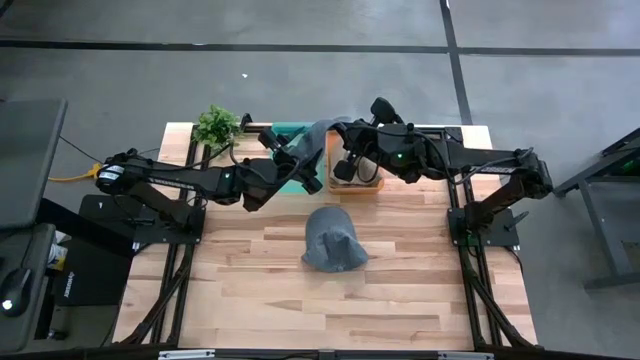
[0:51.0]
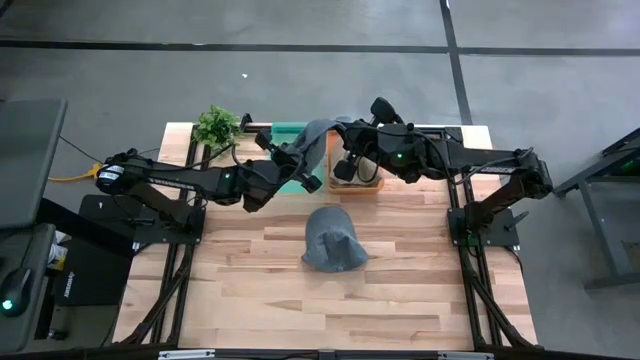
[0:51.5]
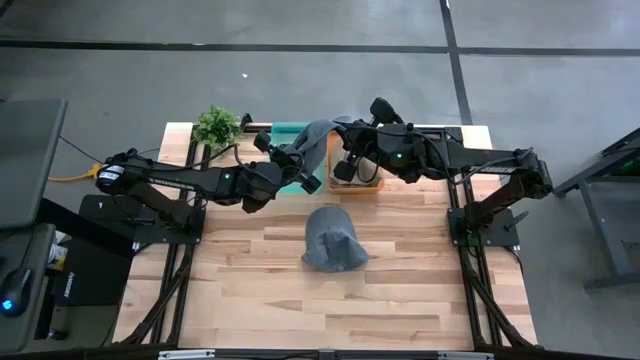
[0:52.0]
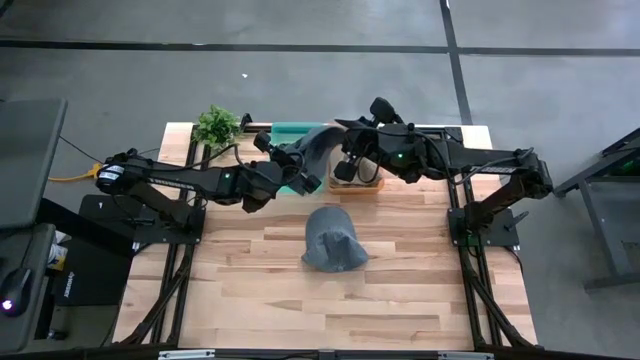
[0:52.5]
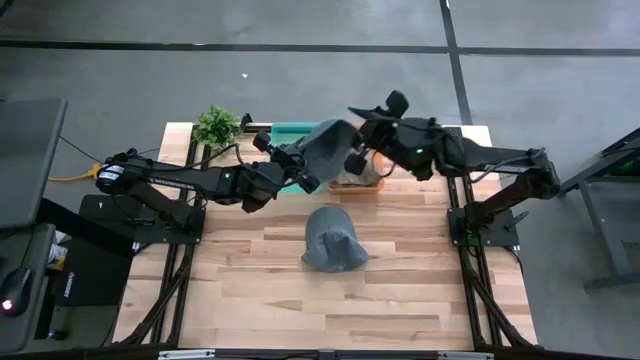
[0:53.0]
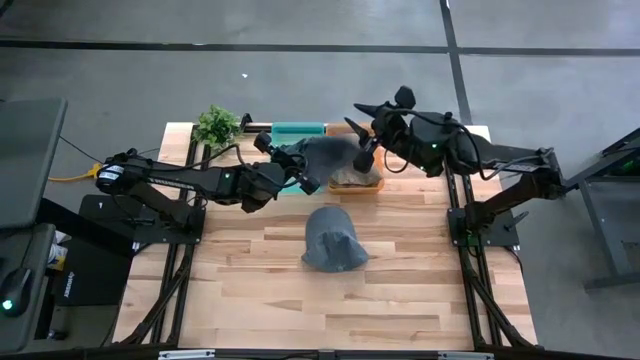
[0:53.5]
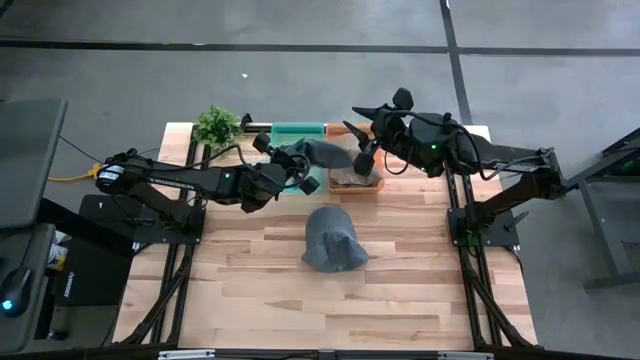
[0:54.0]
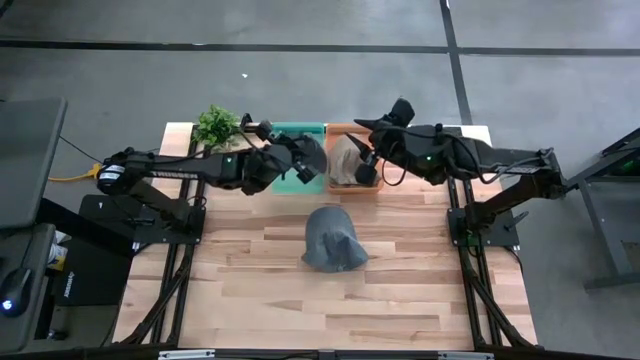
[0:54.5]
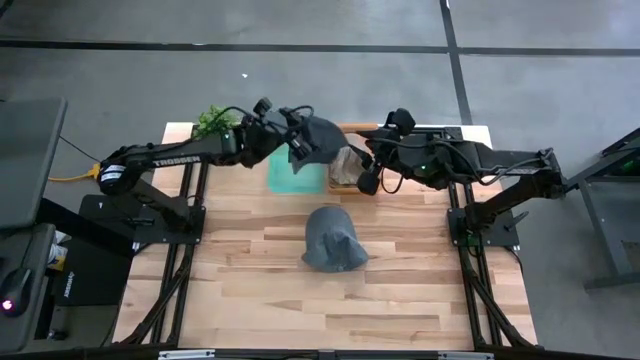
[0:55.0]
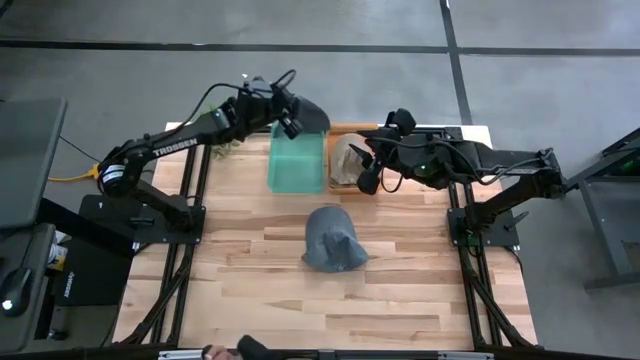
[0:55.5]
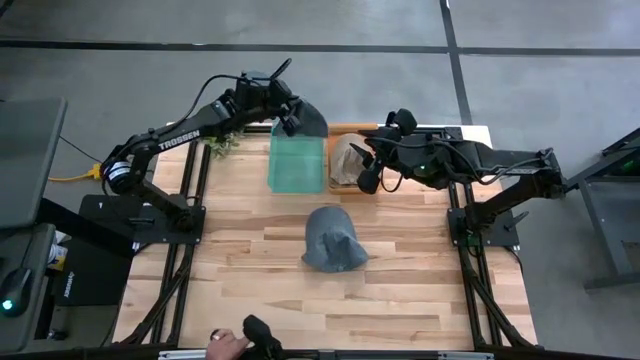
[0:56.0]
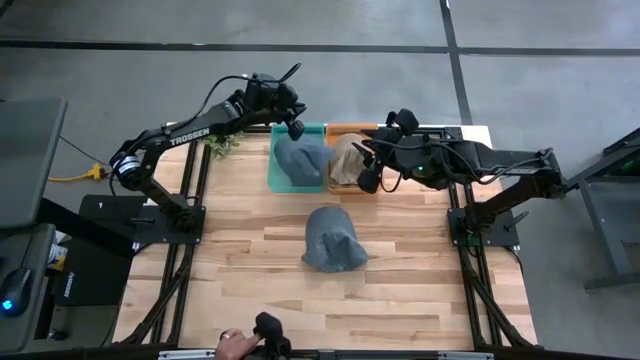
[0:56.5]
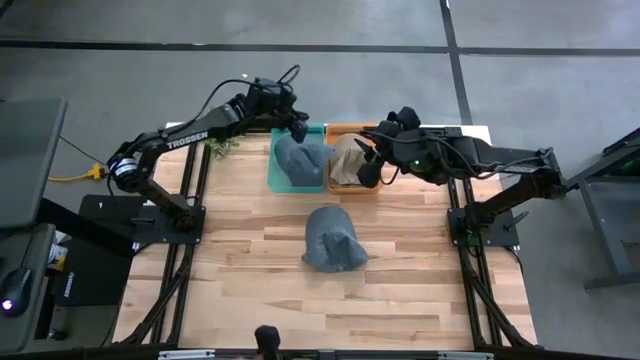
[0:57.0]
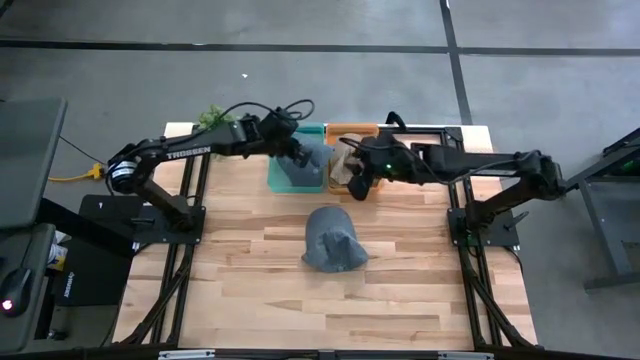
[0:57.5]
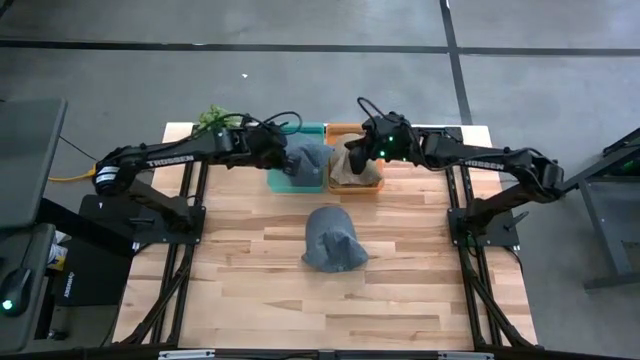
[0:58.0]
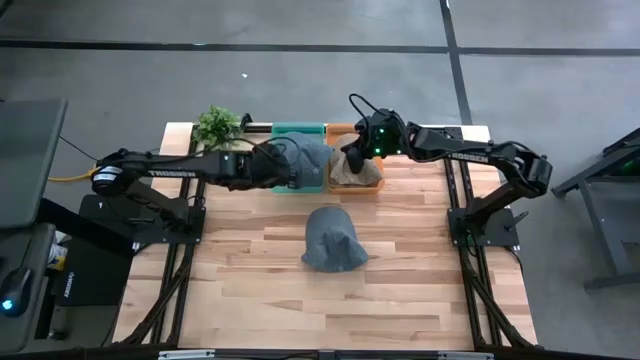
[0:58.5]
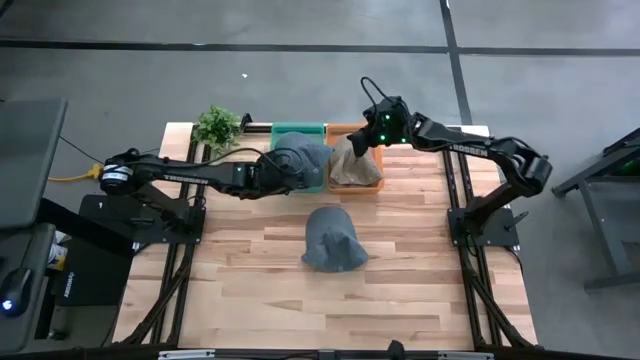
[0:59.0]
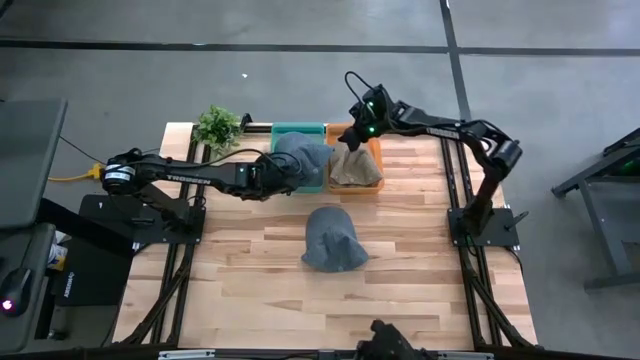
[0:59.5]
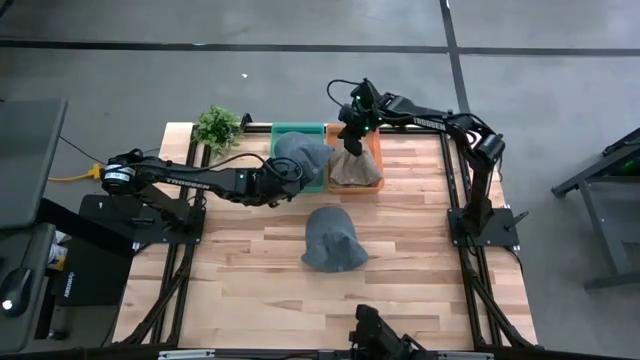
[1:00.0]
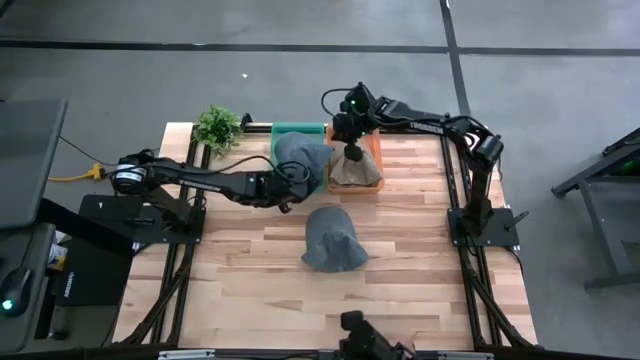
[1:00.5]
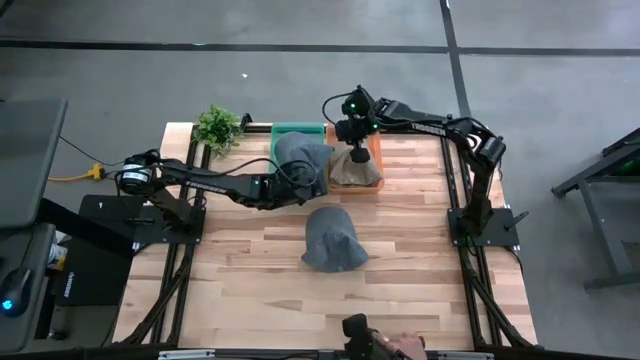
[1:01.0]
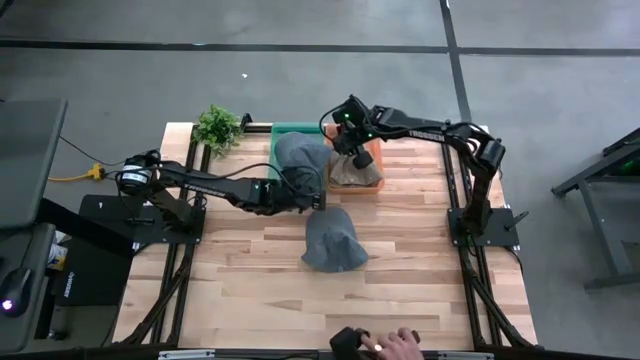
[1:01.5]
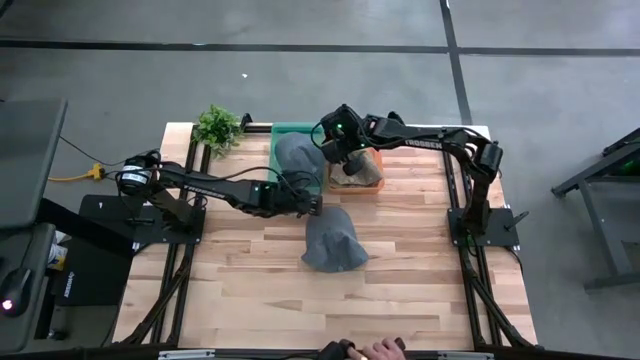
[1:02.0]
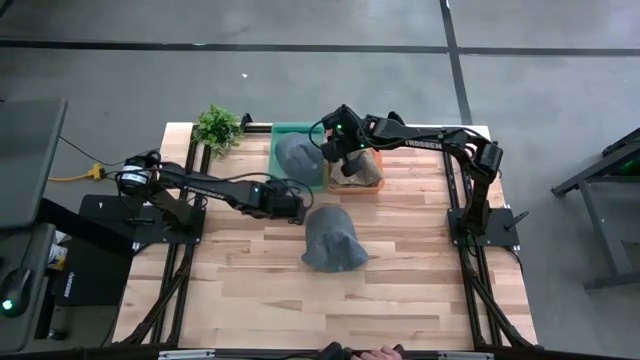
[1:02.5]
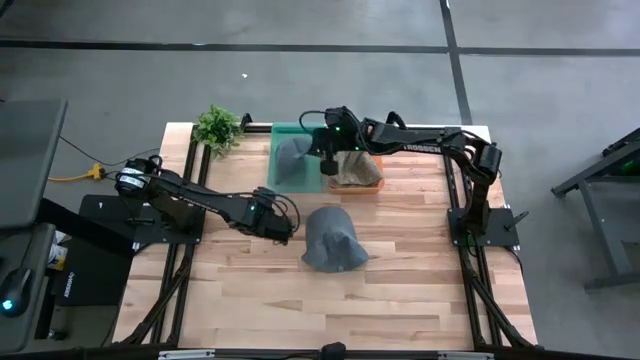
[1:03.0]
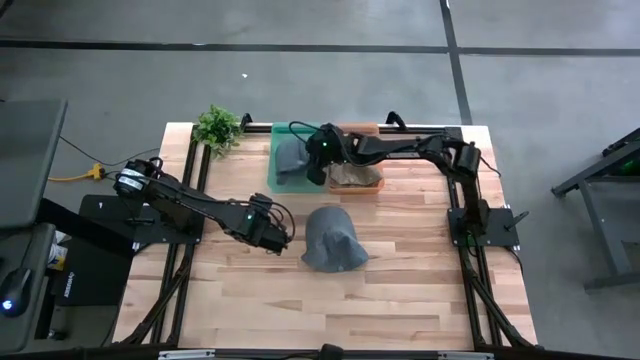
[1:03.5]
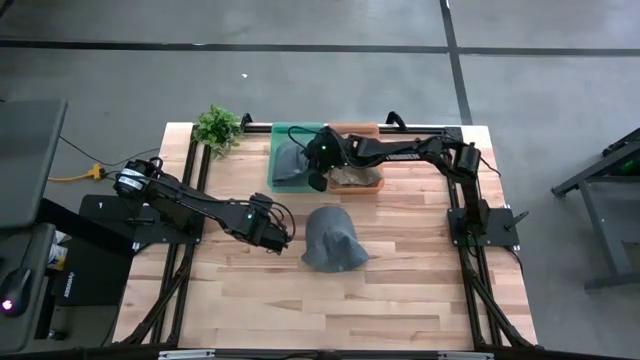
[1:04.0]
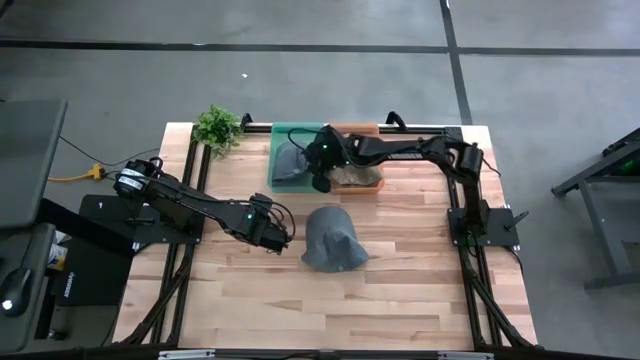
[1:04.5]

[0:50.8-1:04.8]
Task: Pick & Place hat
Put the bottom blue cap into the green bin

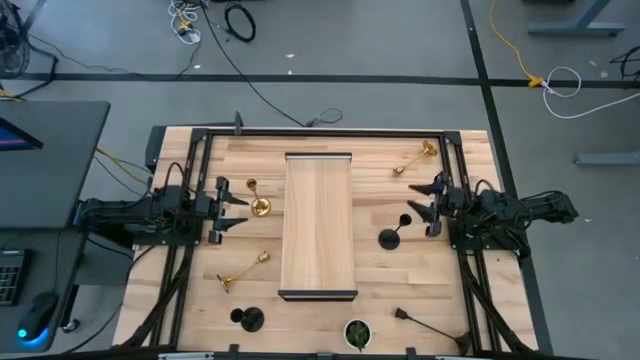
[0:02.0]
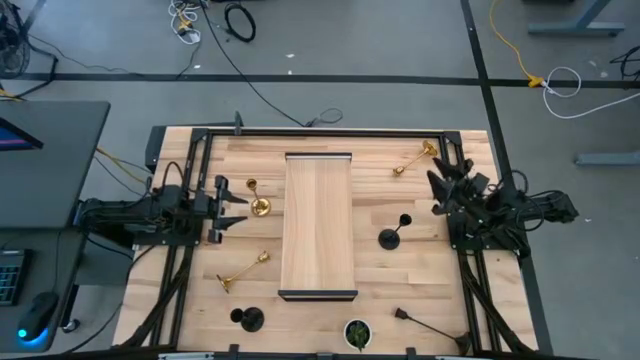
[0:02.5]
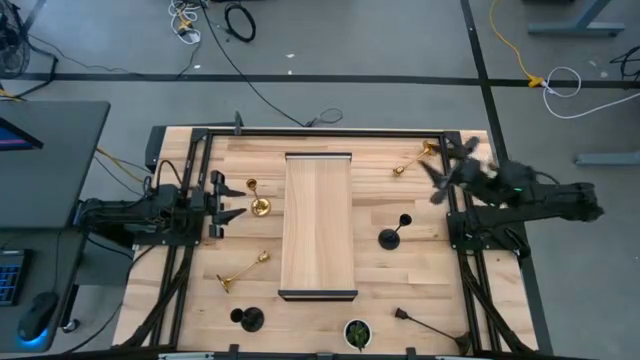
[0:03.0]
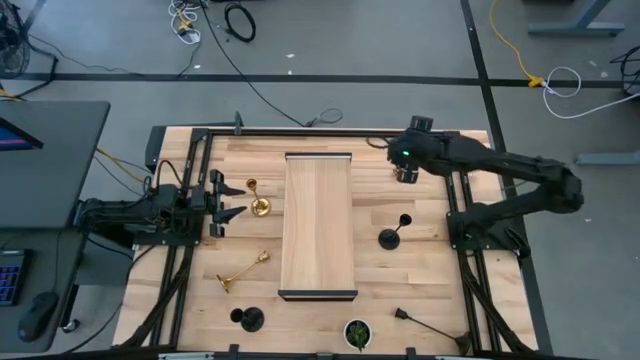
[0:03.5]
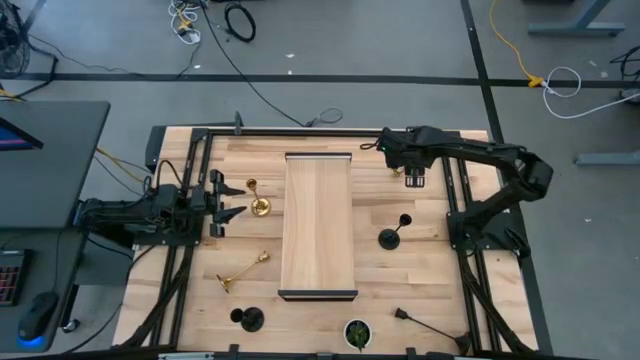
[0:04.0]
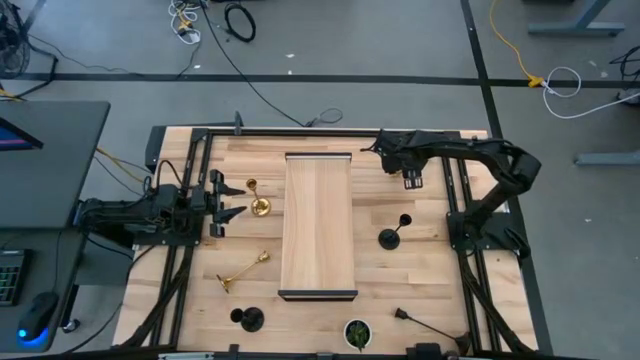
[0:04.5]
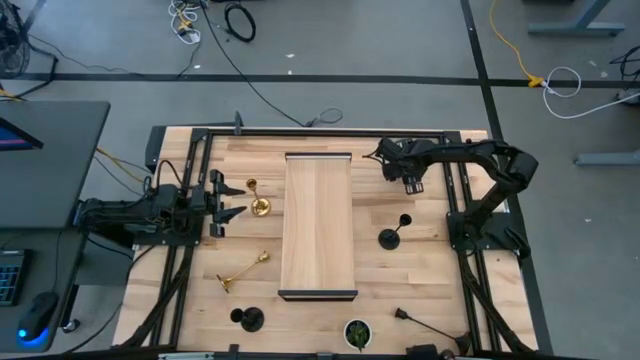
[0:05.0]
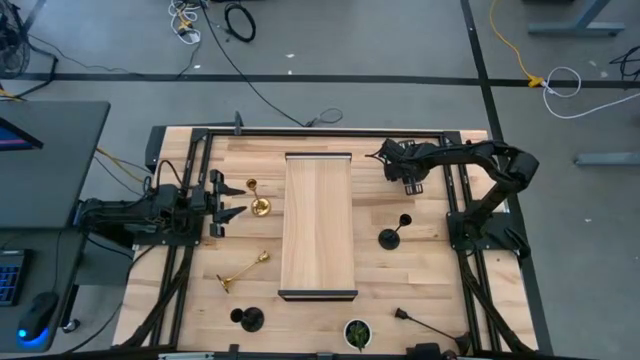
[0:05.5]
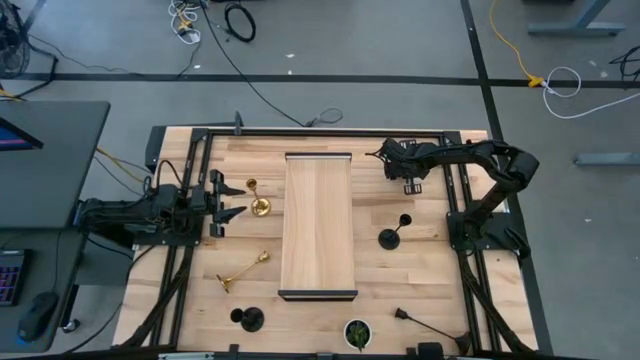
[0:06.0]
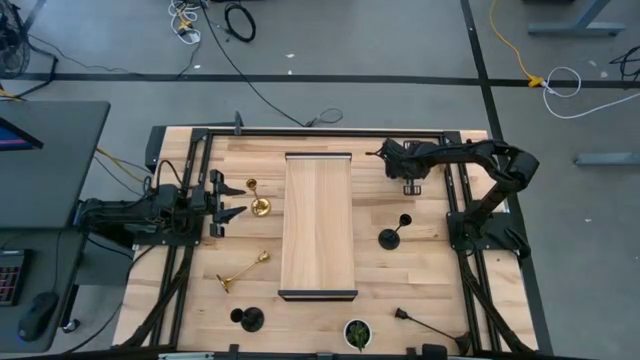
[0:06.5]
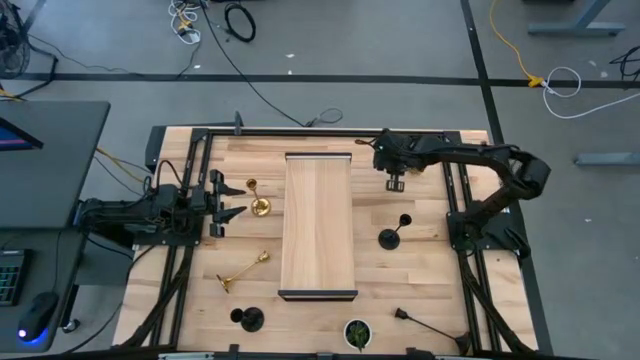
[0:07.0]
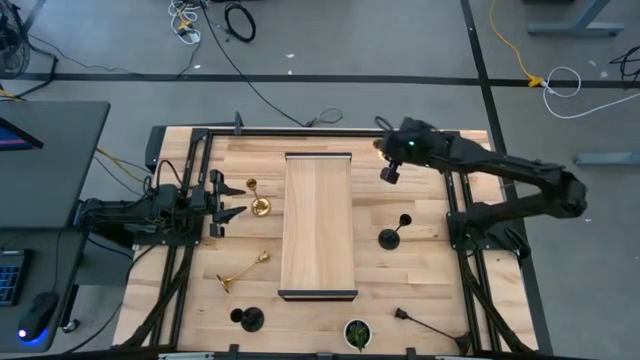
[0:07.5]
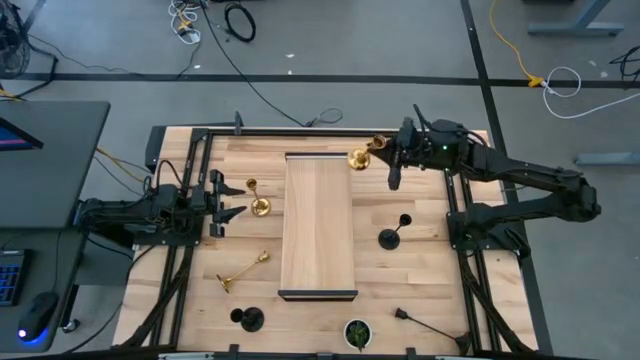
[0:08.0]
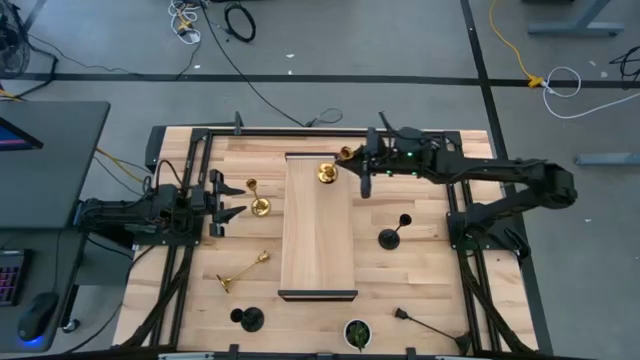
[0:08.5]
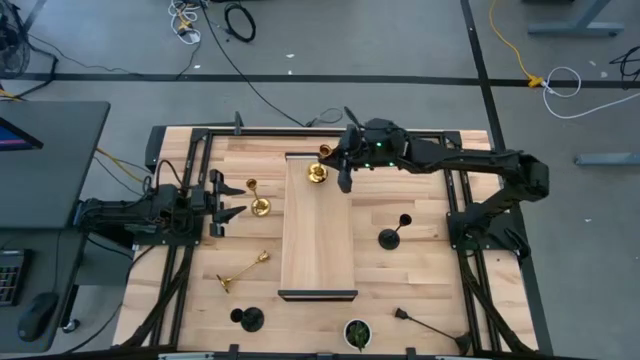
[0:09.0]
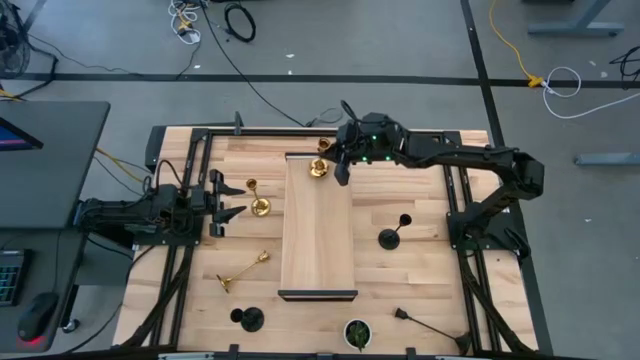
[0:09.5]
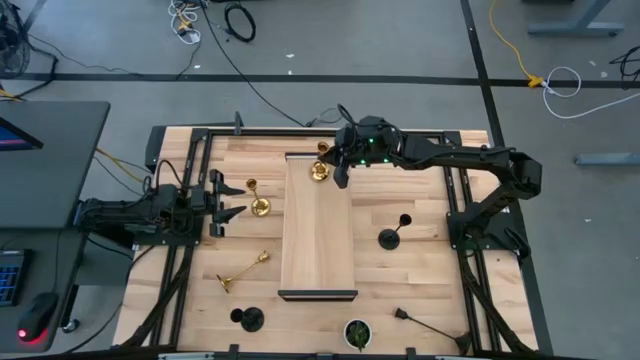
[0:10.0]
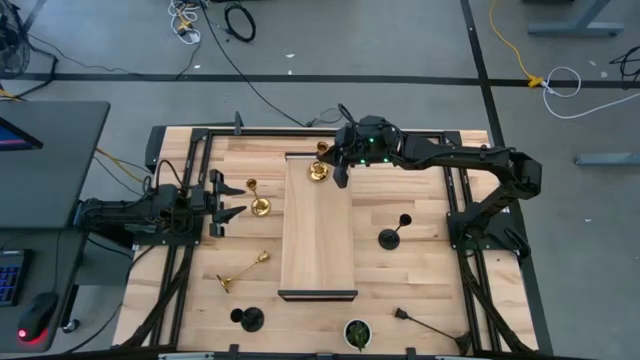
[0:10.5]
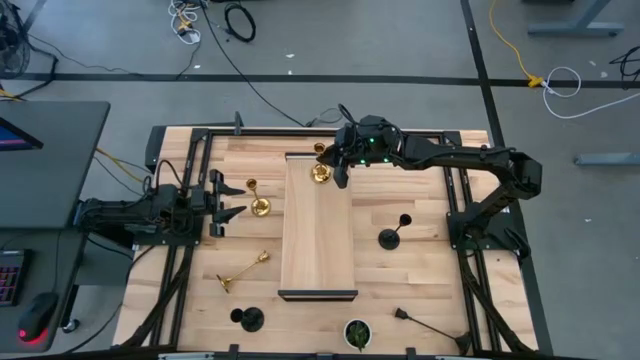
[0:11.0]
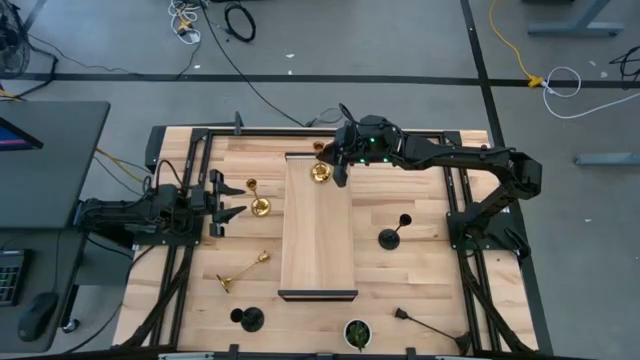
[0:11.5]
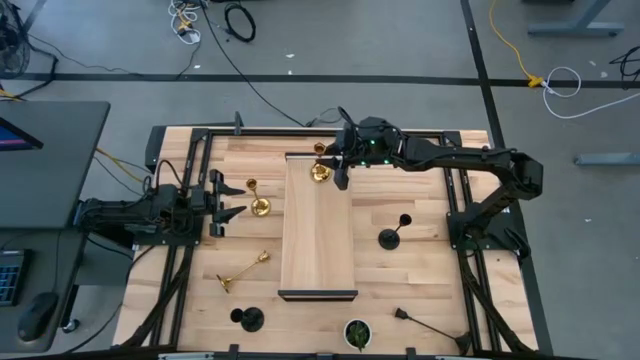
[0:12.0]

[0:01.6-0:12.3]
Task: Pick & Place candle stick holders
Put the top gold candle holder on the shelf
